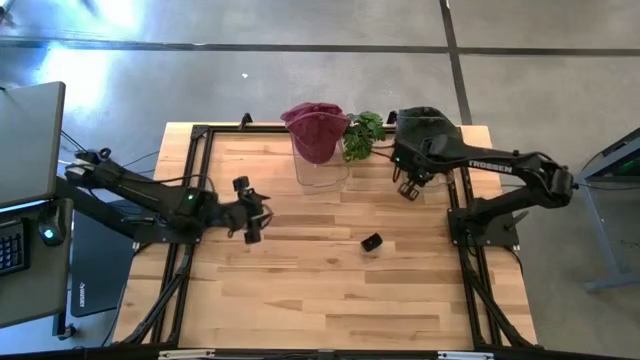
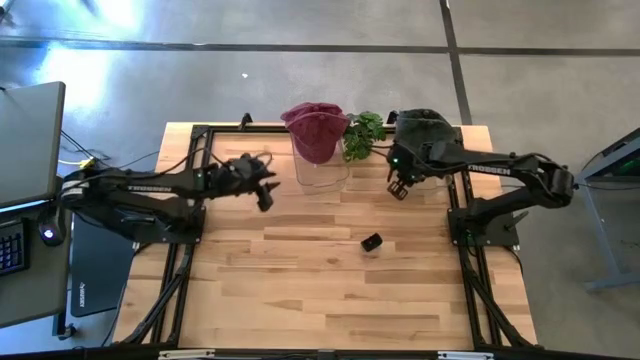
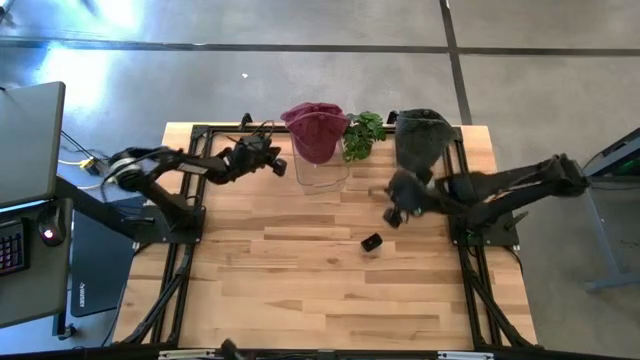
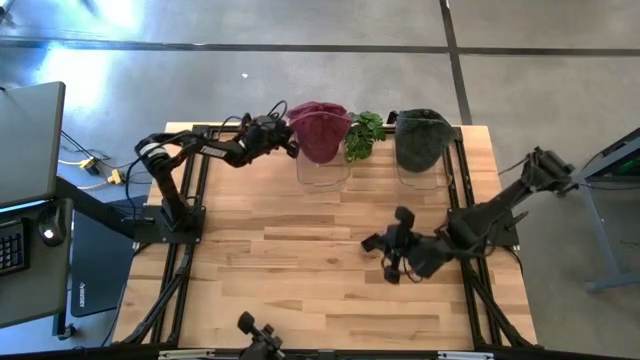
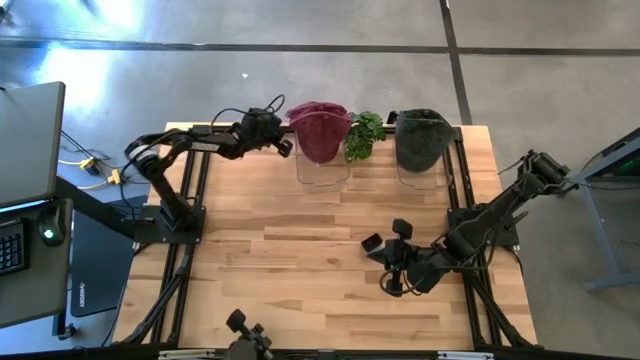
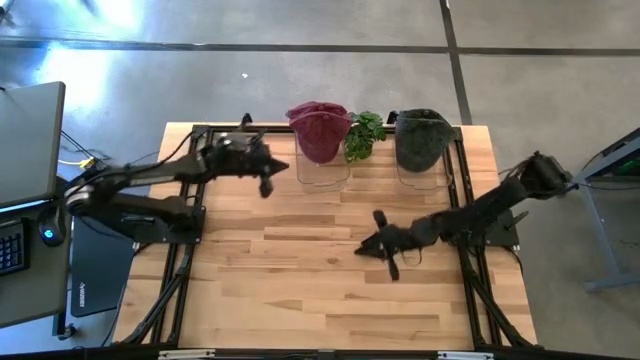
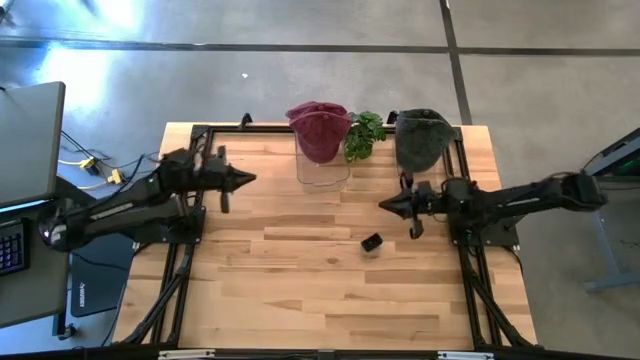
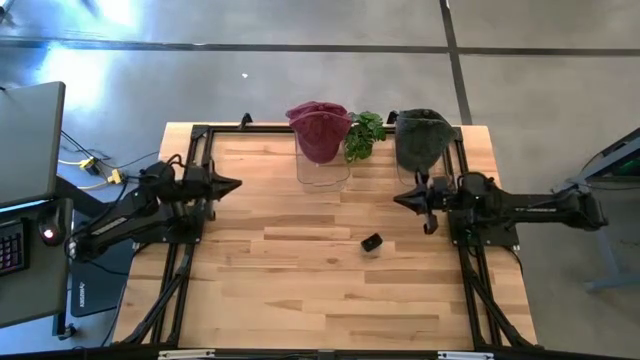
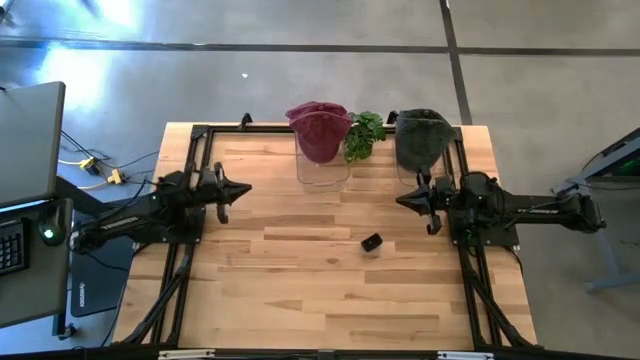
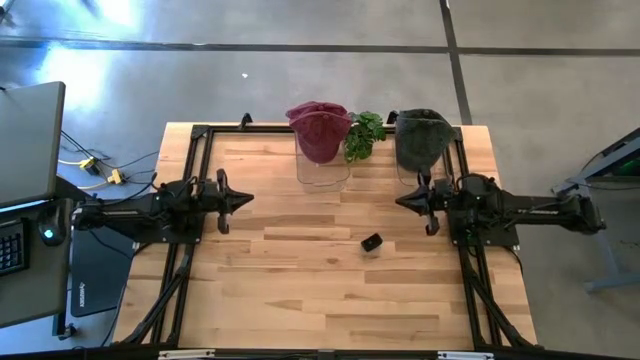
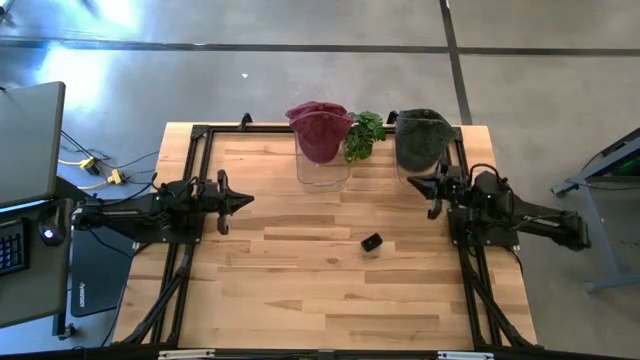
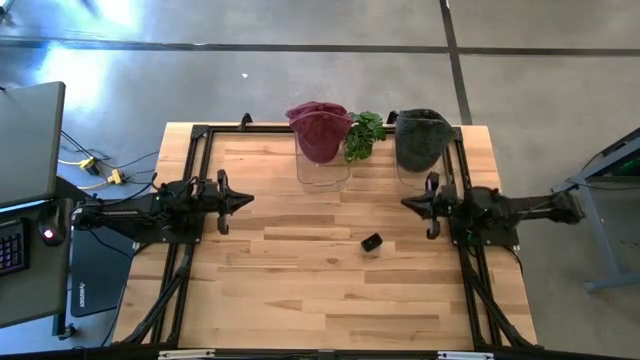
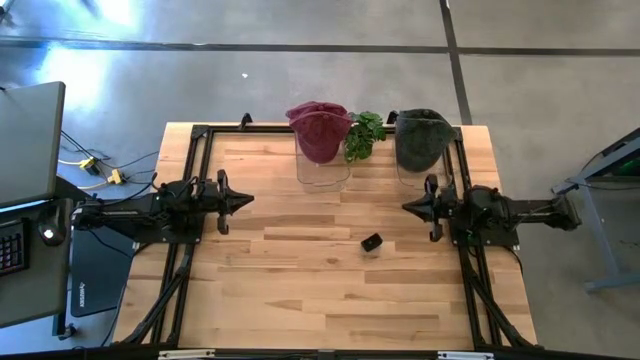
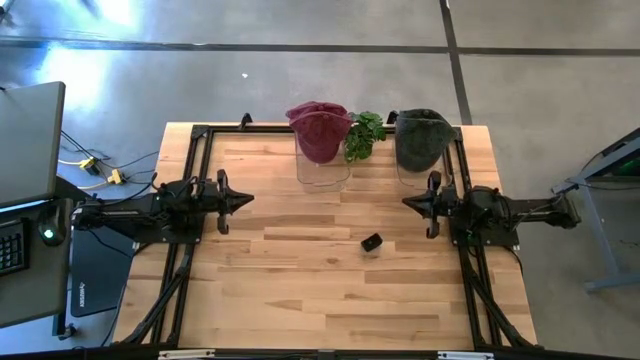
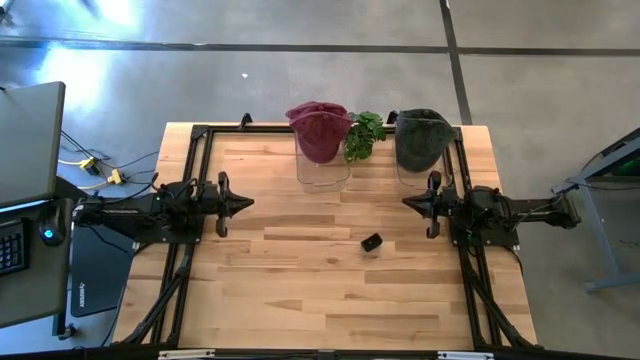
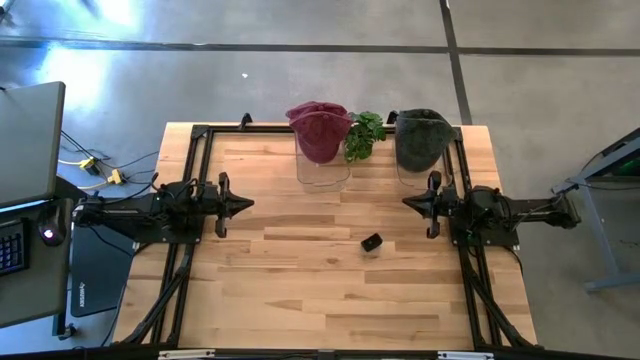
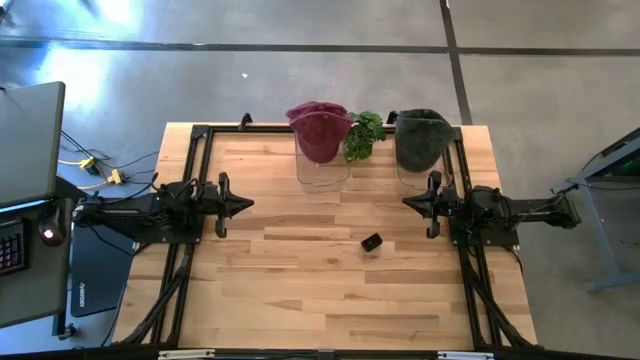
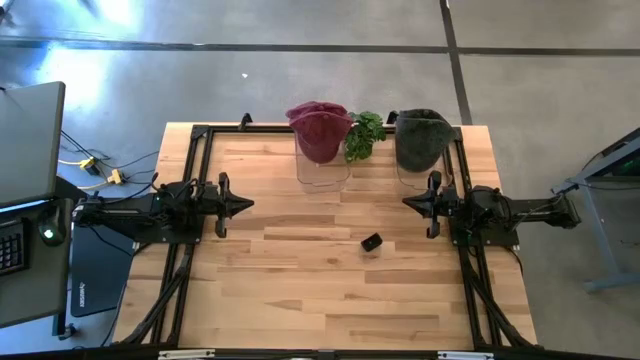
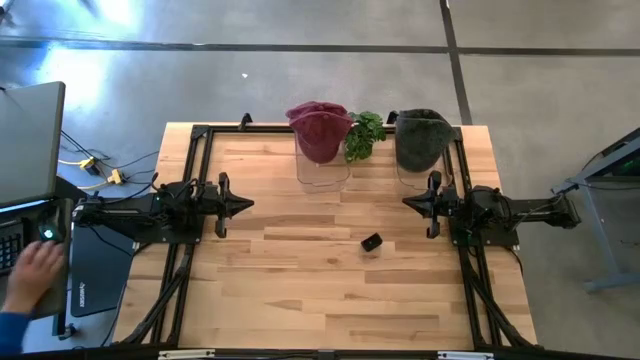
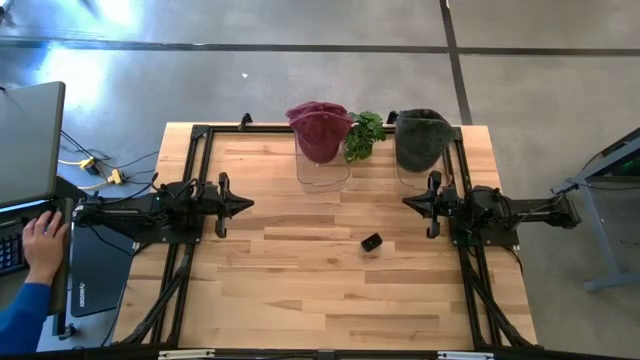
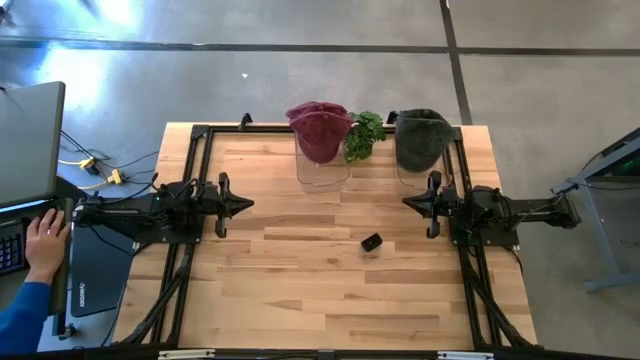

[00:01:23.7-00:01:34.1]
Task: Pick & Place hat
Return to Home Position

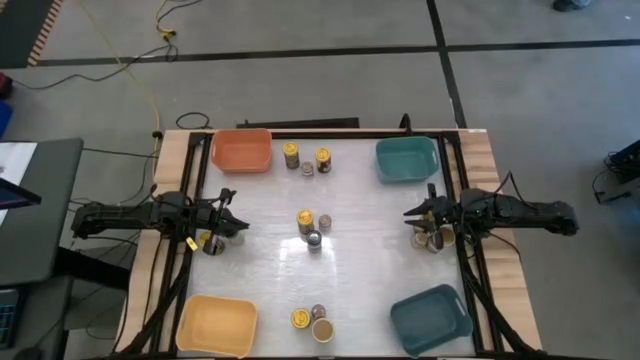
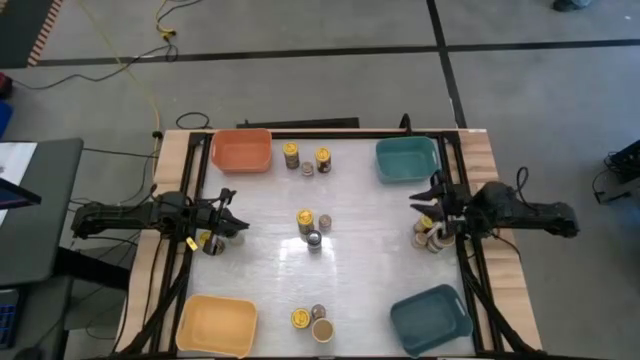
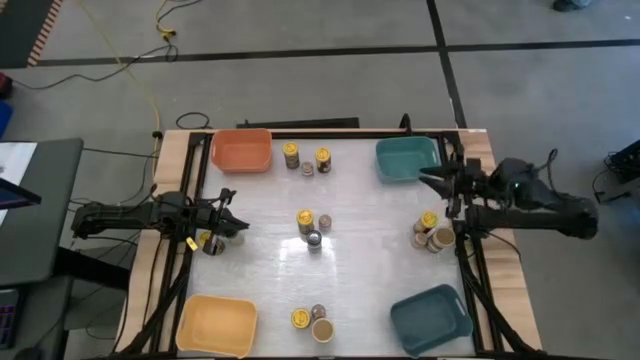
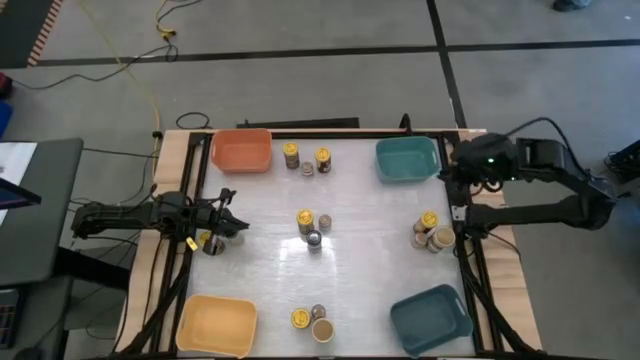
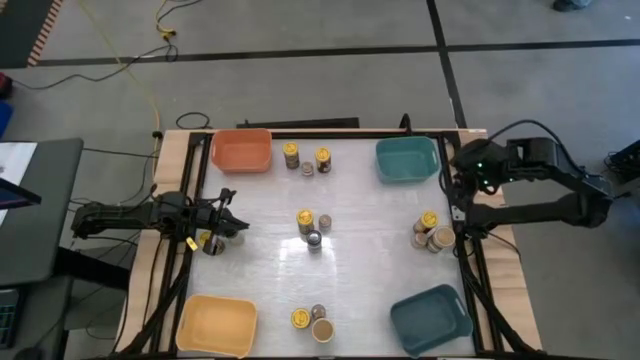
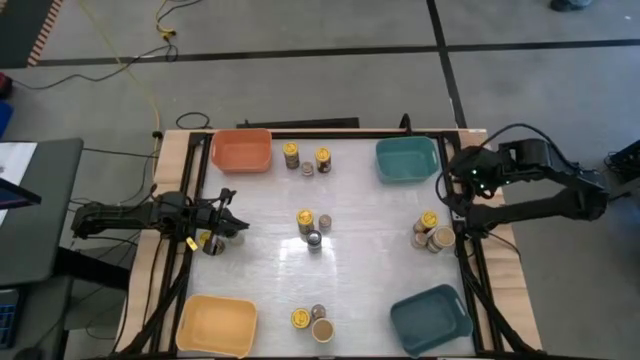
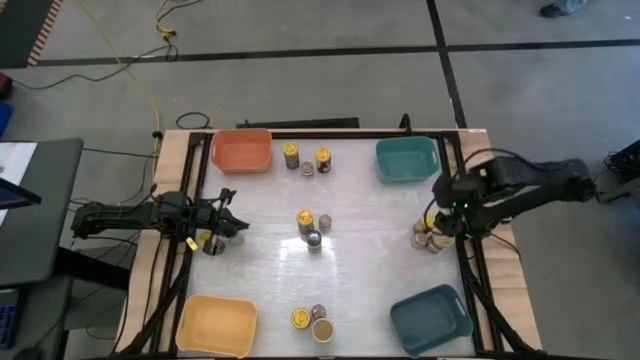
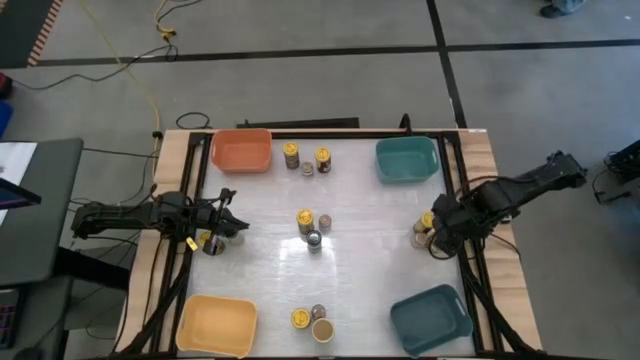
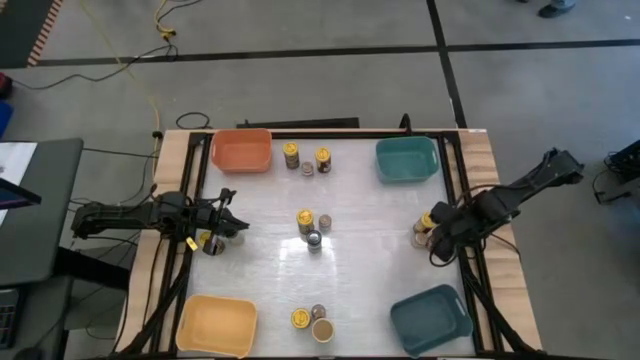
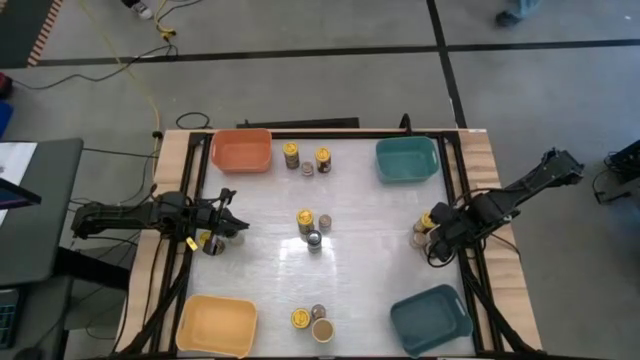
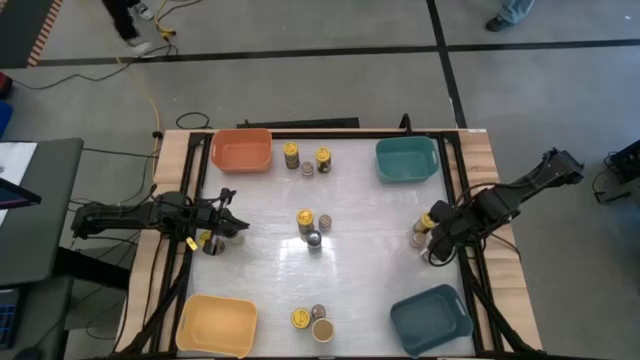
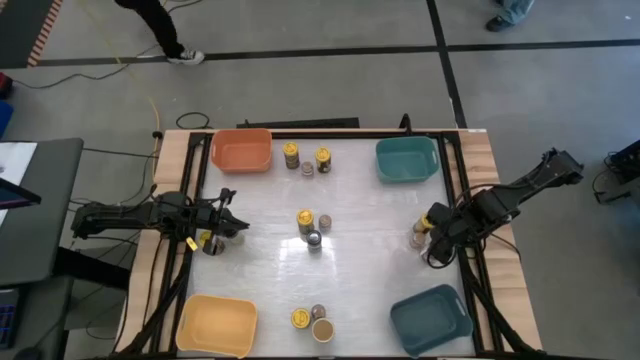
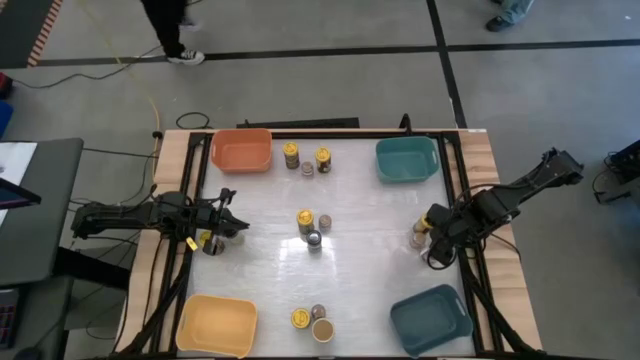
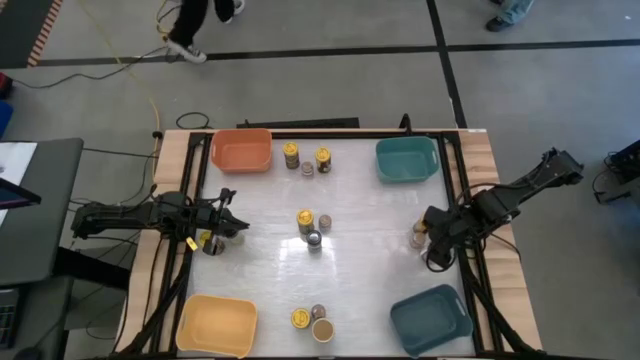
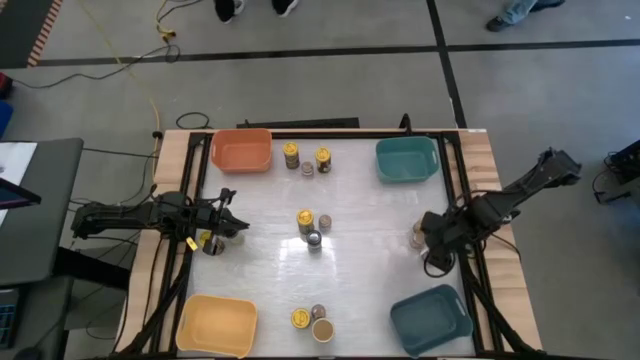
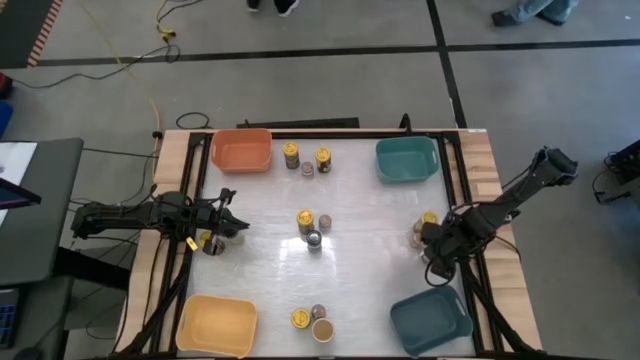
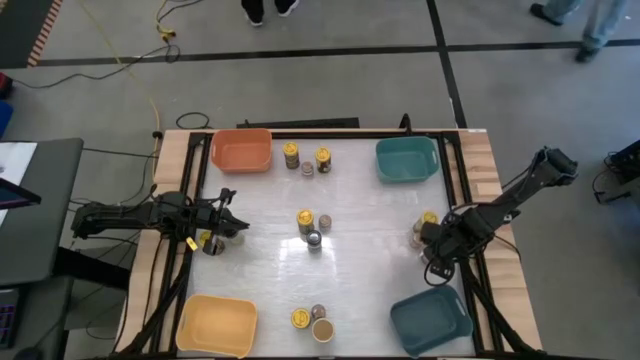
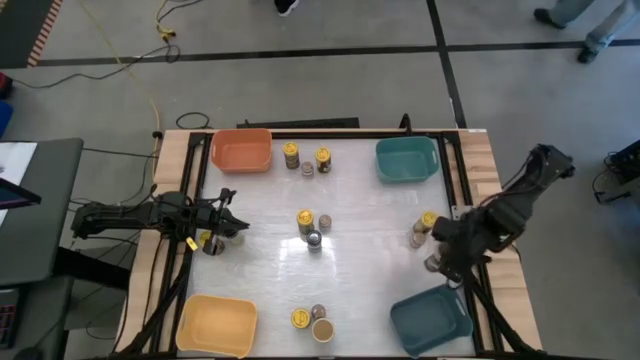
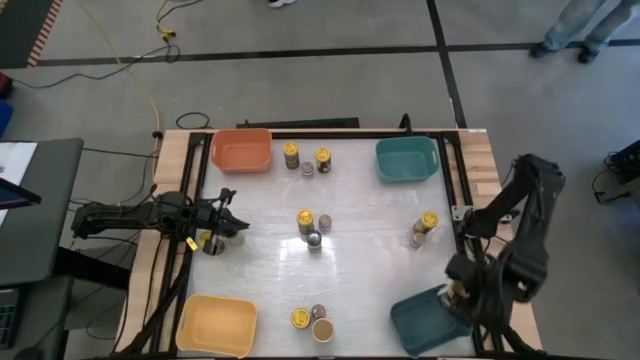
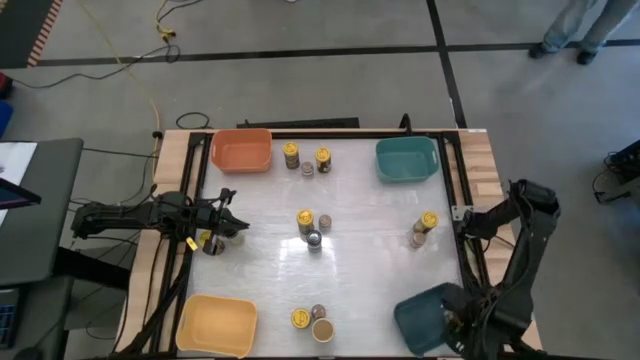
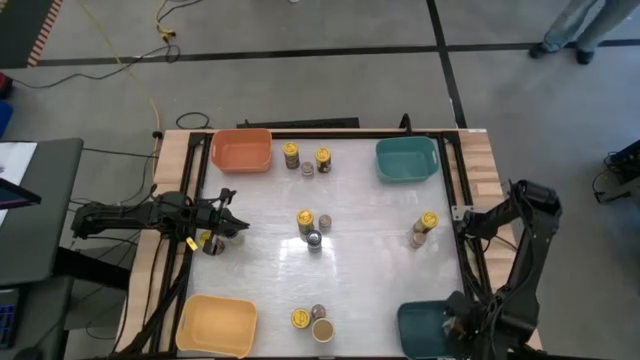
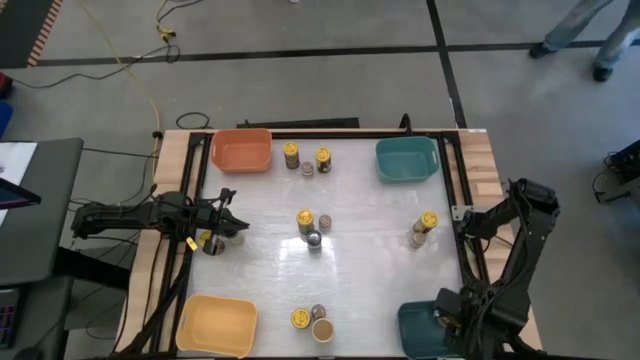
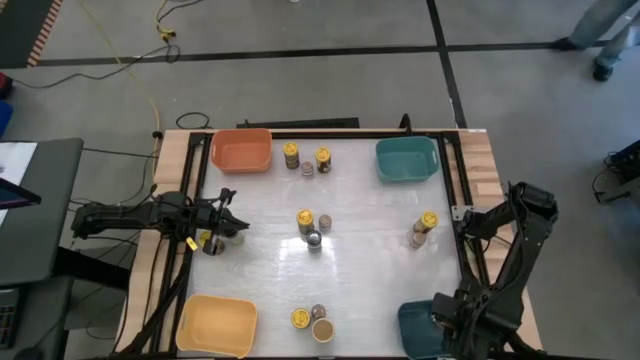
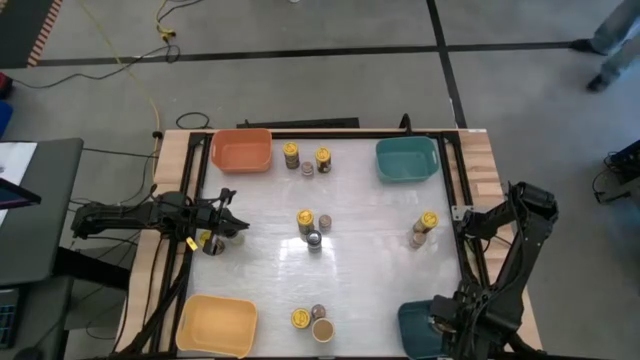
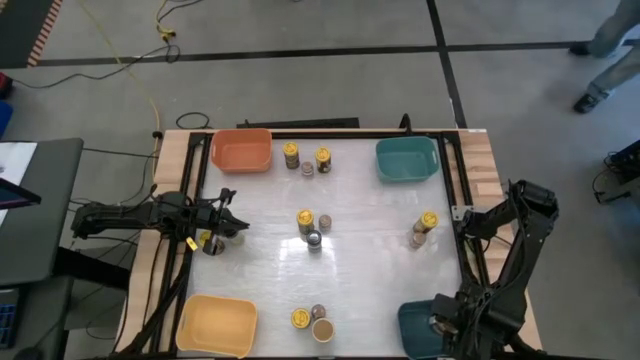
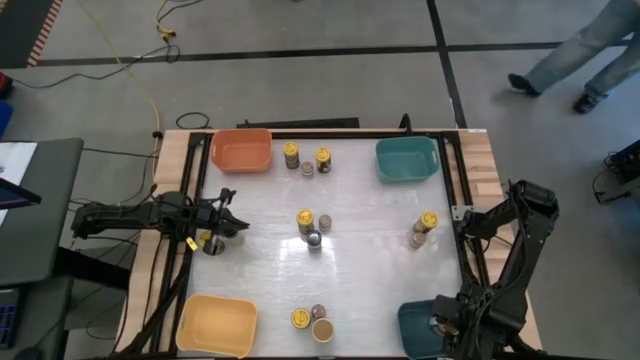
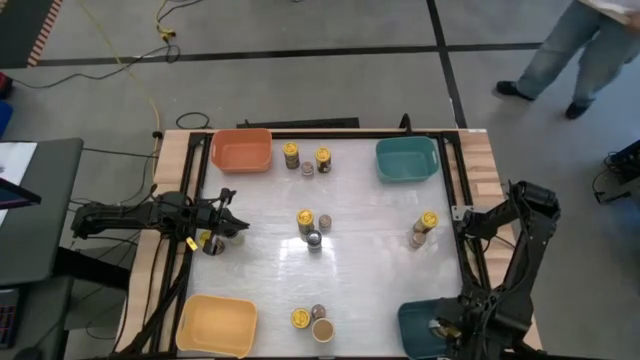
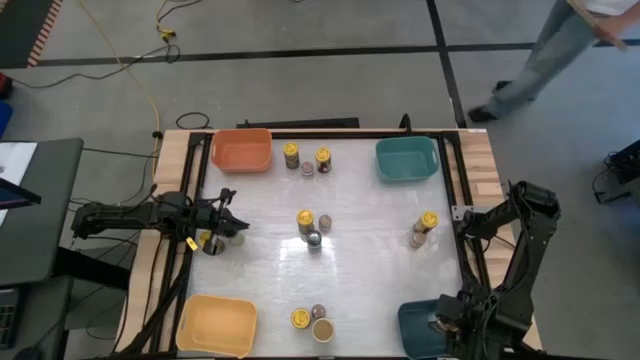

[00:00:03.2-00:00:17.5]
Task: Sort spices by type
Put the top gold seasoning bottle into the bottom teal dark blue bin
